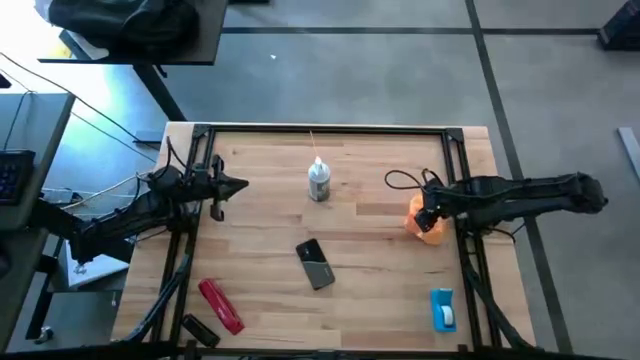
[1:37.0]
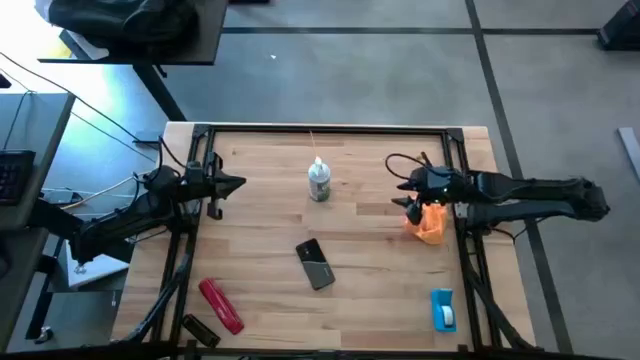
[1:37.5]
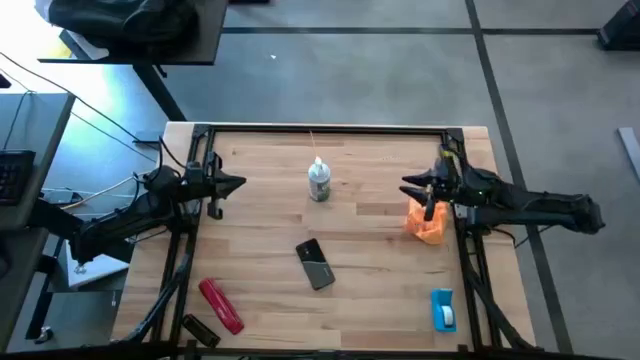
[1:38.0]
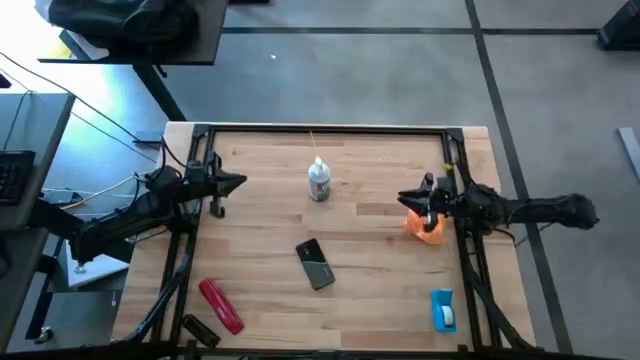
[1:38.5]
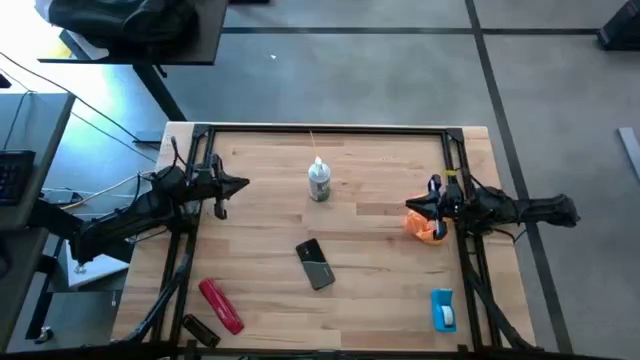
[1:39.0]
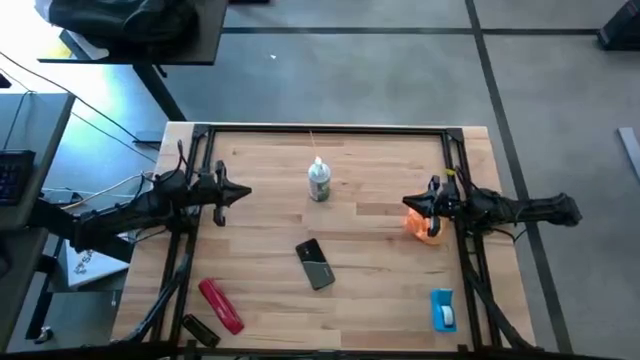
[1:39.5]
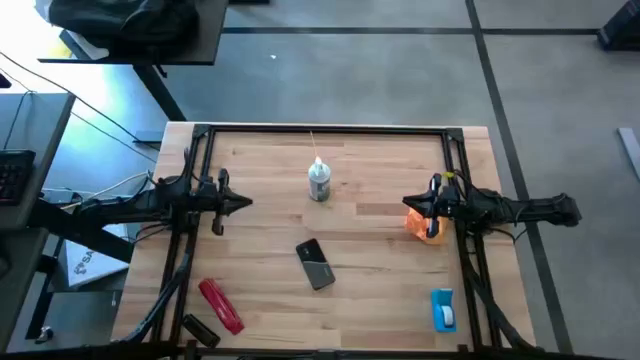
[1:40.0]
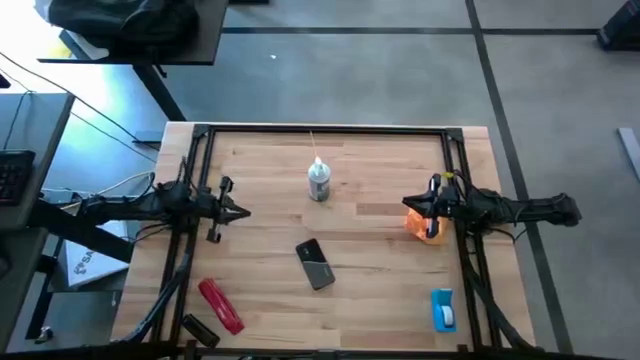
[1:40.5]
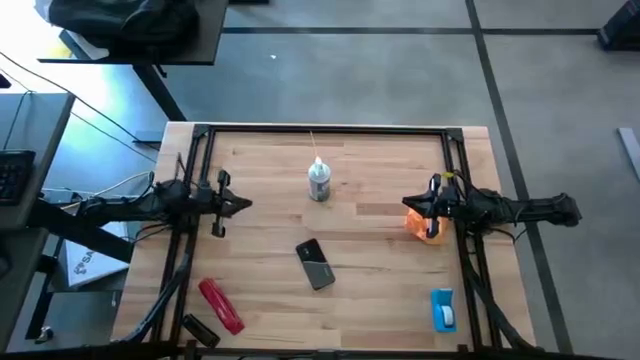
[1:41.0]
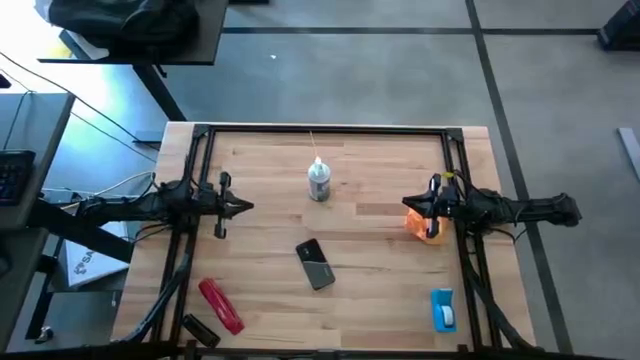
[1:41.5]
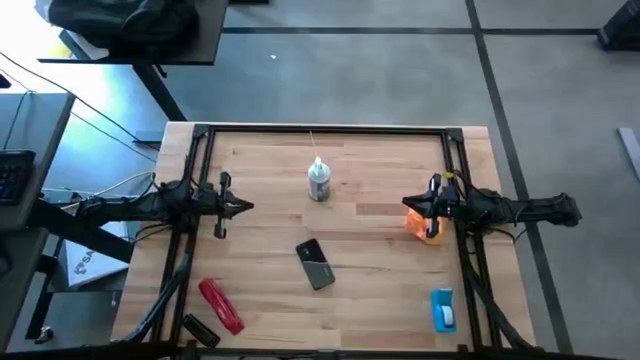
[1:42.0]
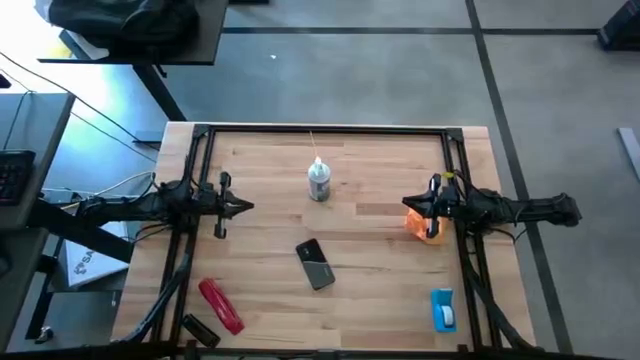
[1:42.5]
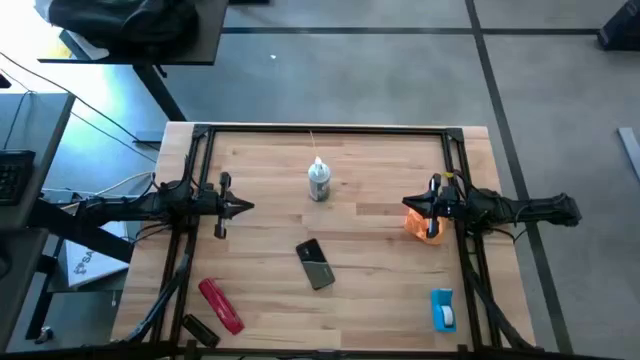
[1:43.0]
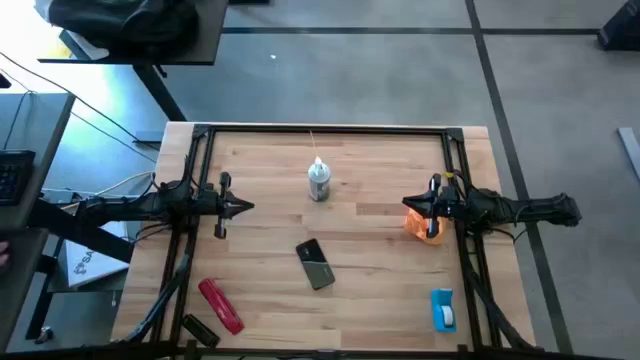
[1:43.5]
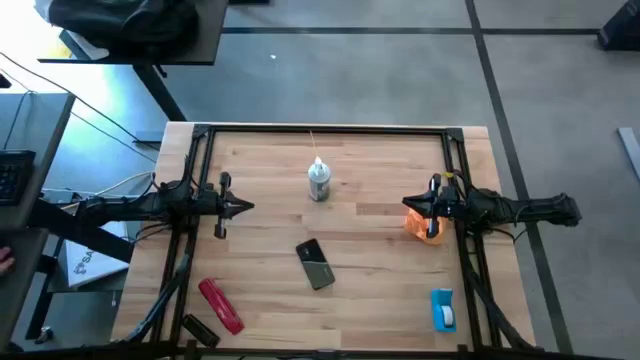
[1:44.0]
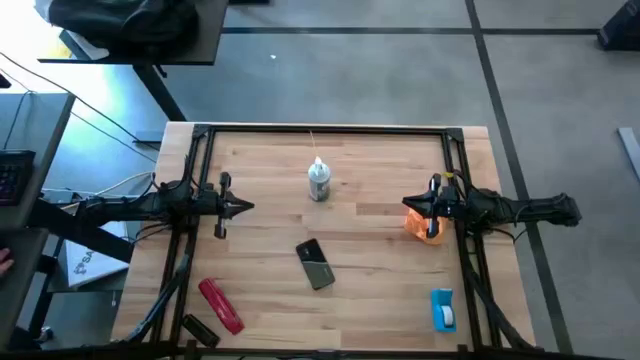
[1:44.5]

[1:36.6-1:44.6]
Task: Apply microfiber cloth
Return to Home Position

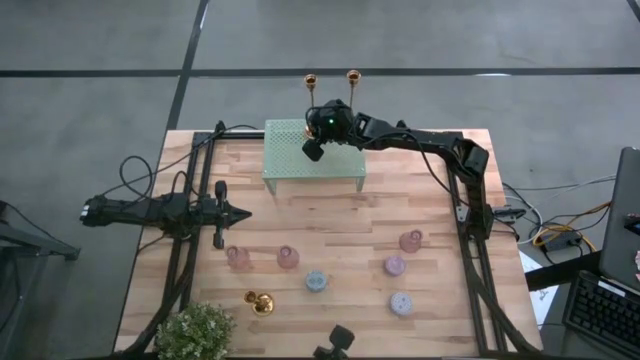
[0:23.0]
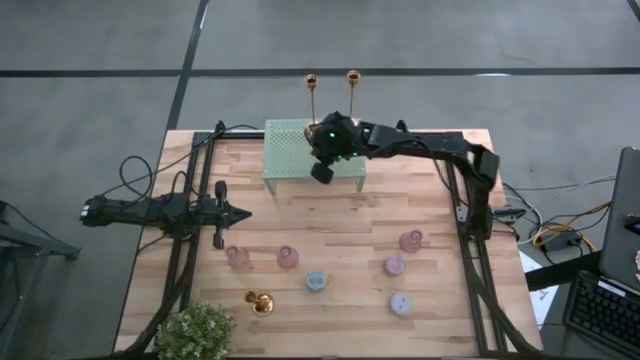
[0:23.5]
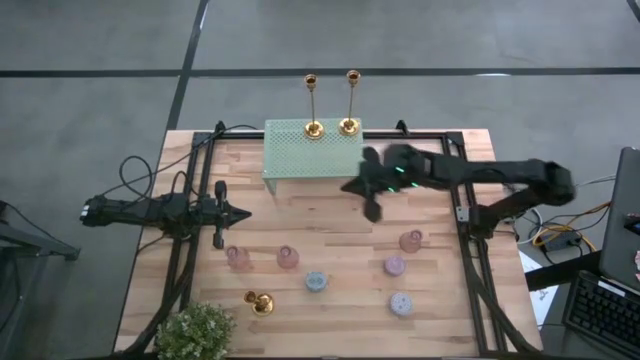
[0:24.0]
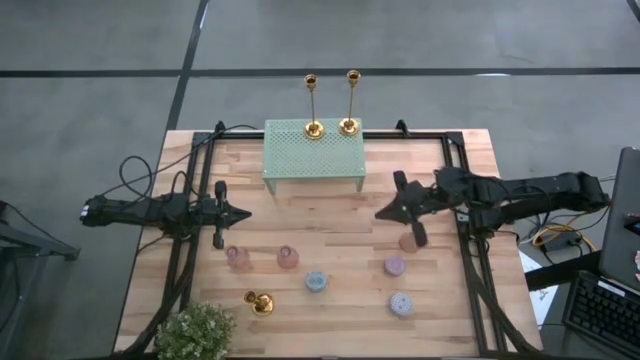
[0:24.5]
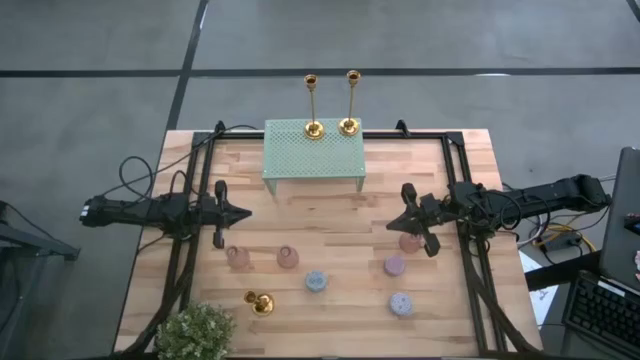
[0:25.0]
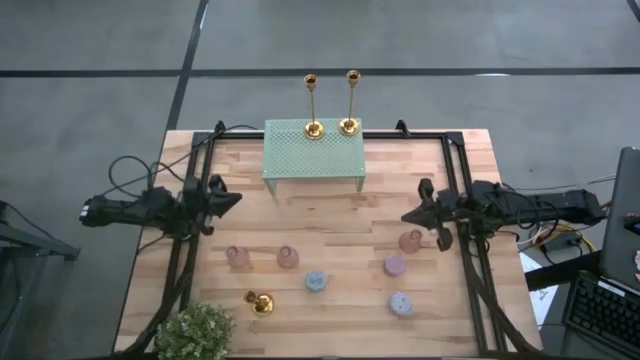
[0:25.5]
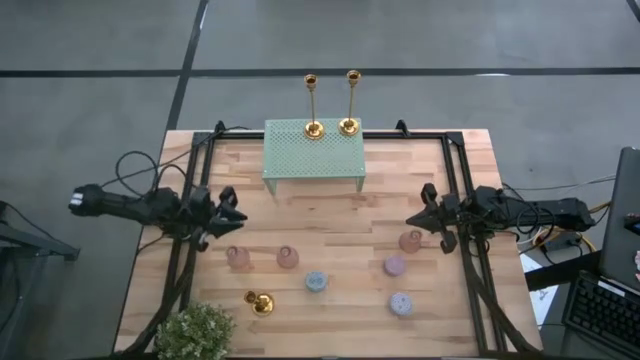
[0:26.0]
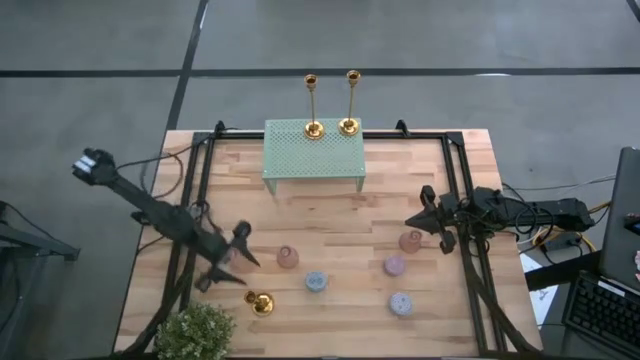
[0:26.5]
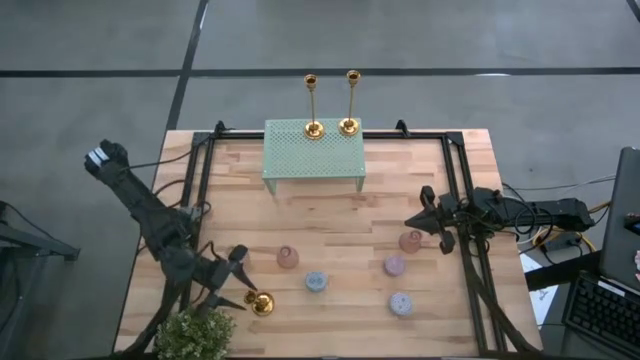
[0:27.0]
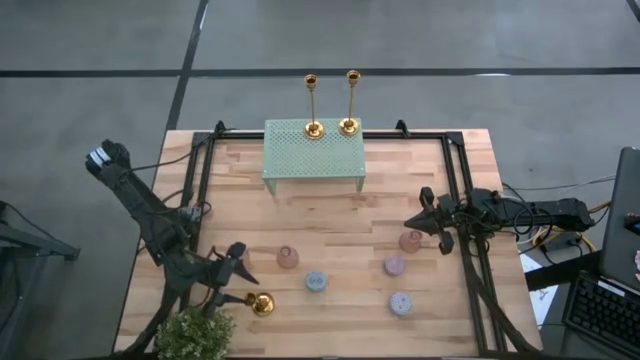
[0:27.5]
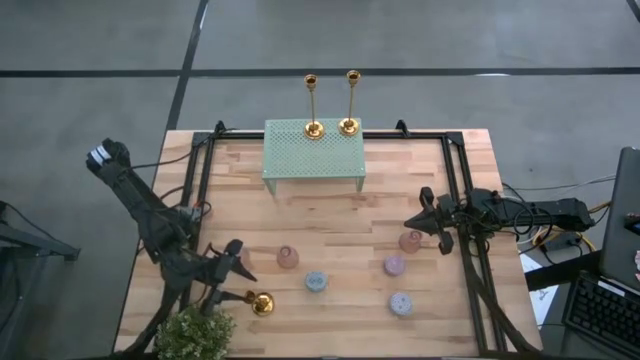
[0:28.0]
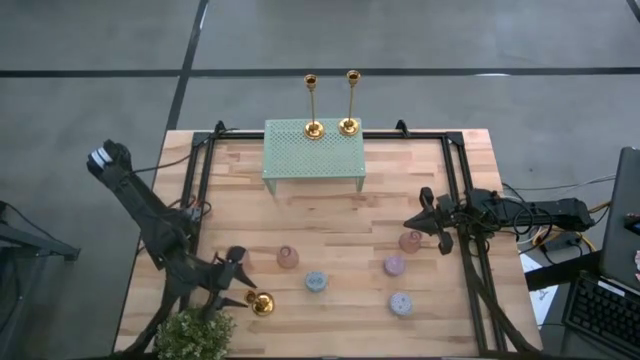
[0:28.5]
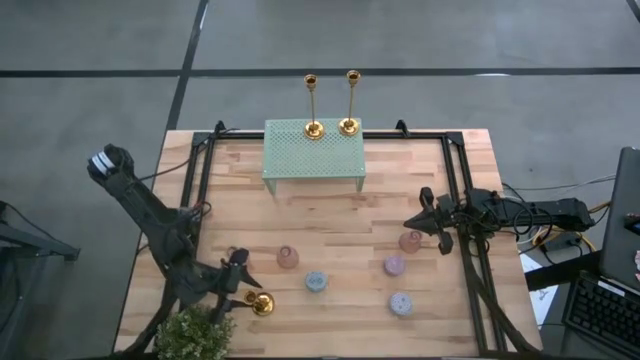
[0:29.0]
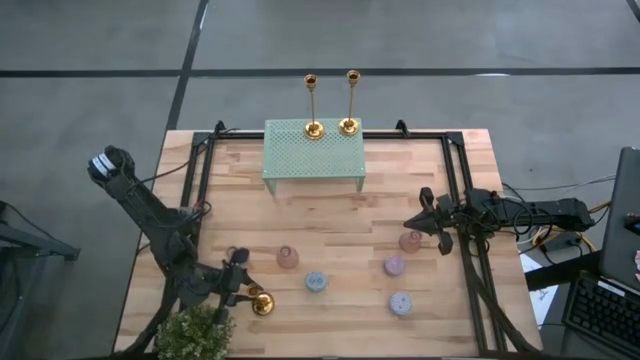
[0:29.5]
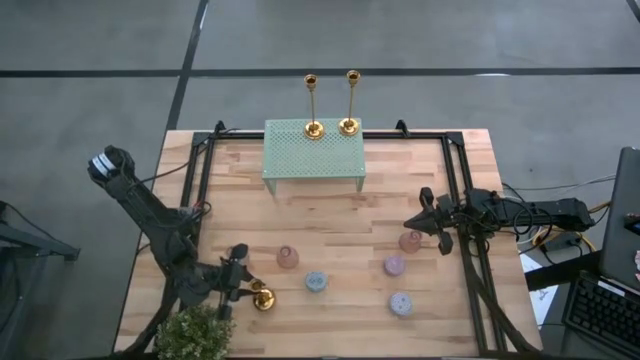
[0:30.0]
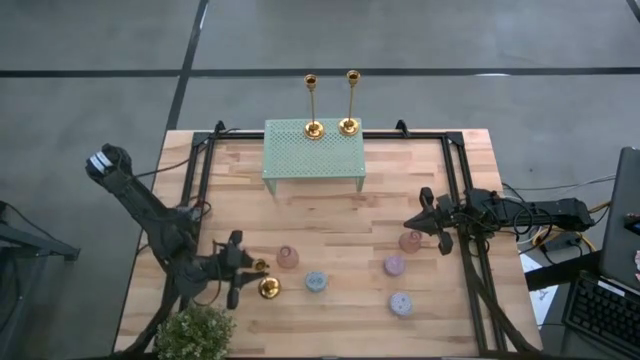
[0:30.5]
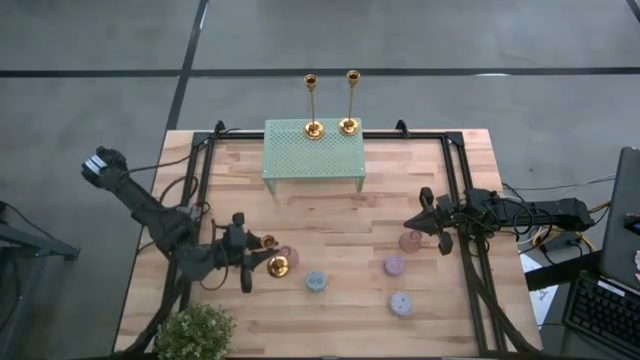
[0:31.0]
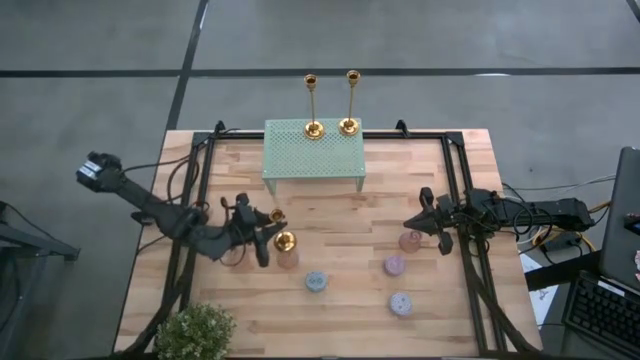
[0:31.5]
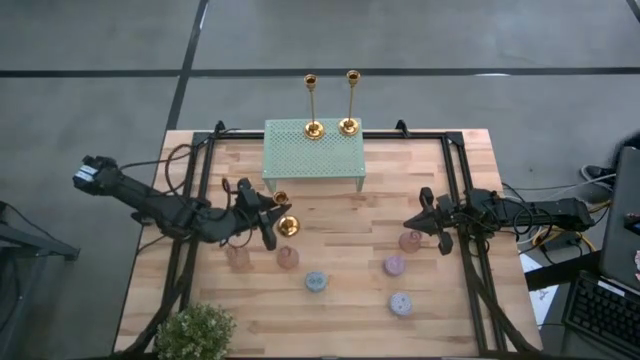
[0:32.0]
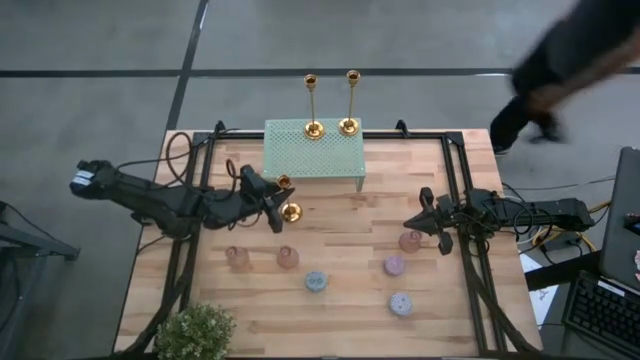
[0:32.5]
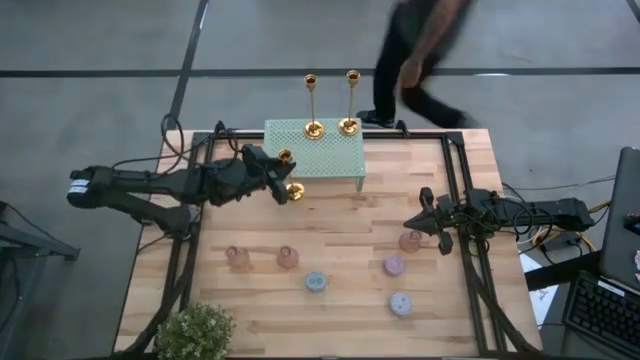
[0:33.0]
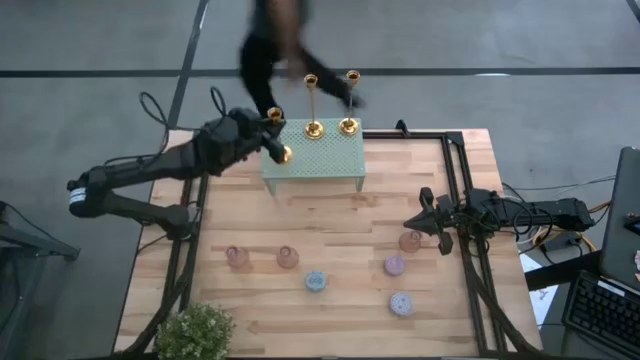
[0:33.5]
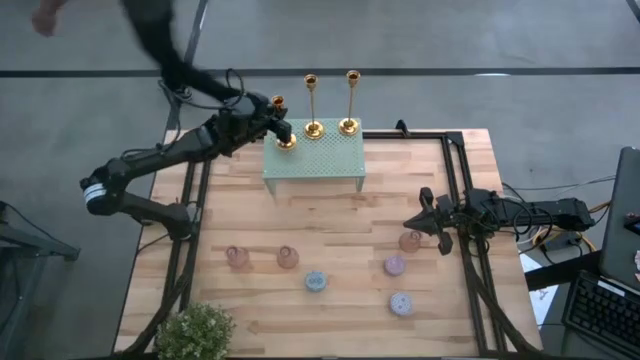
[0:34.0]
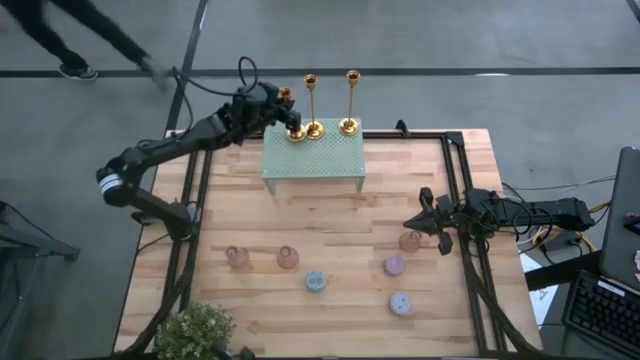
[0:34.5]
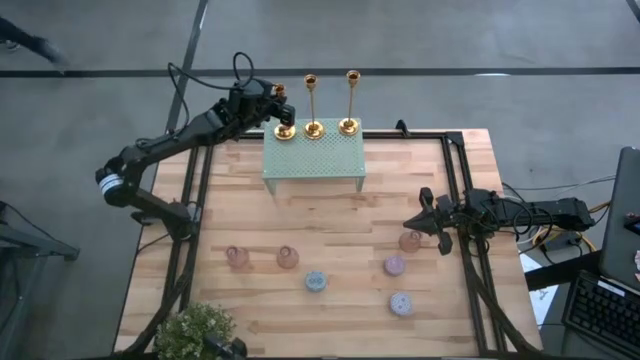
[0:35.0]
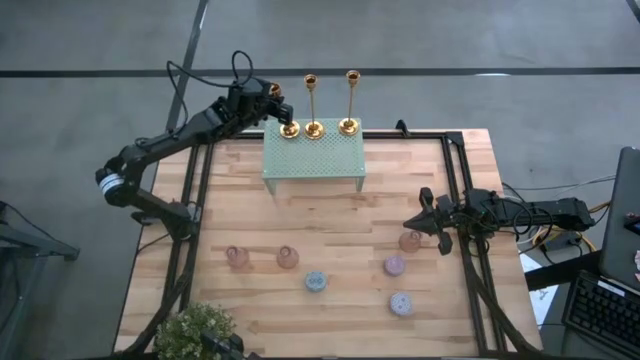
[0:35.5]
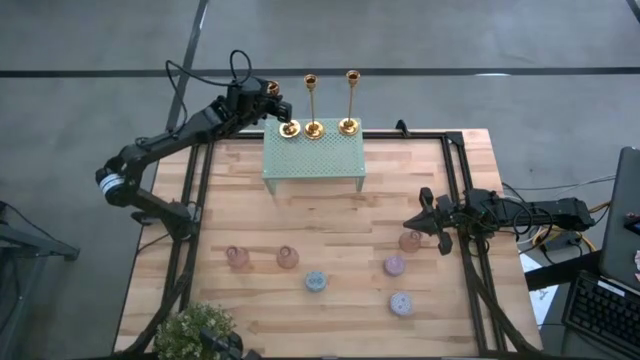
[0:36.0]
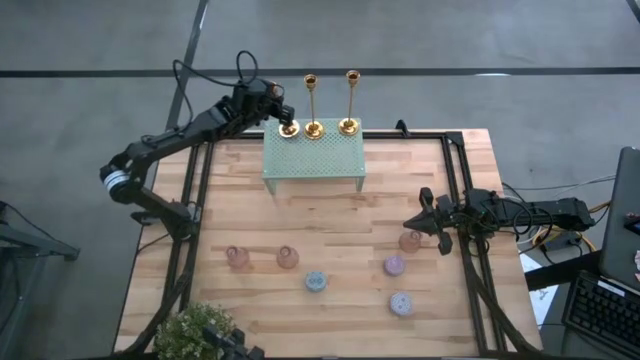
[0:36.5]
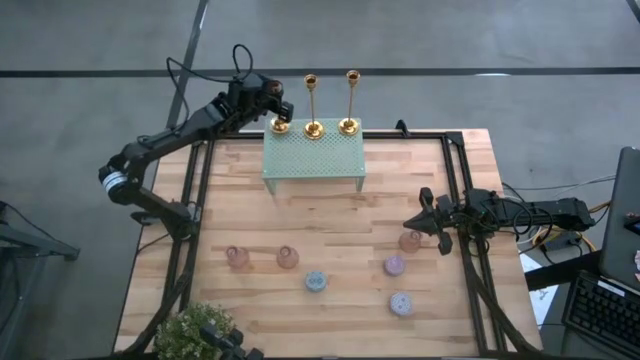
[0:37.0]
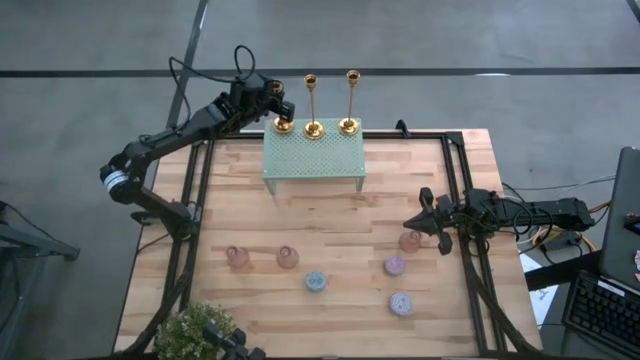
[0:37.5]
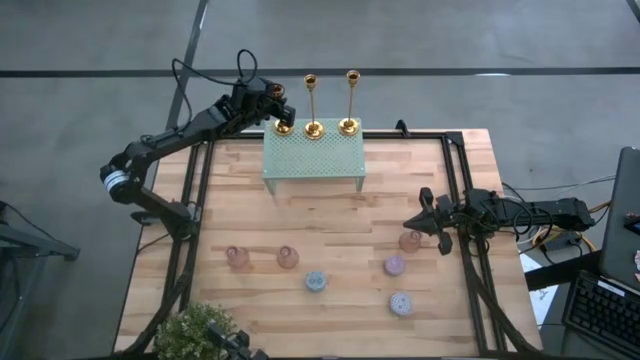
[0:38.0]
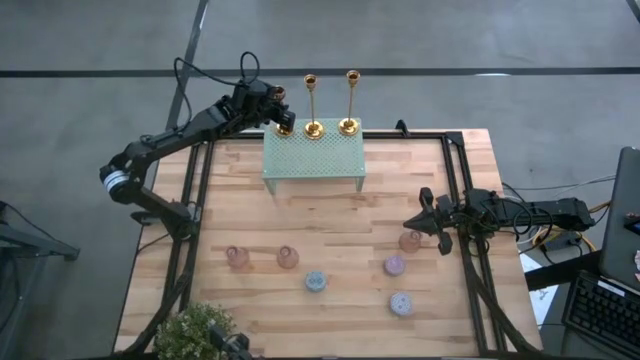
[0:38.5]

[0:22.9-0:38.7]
Task: Pick & Place candle stick holders
Put the gold candle holder on the shelf aligned with the other gold candle holders
